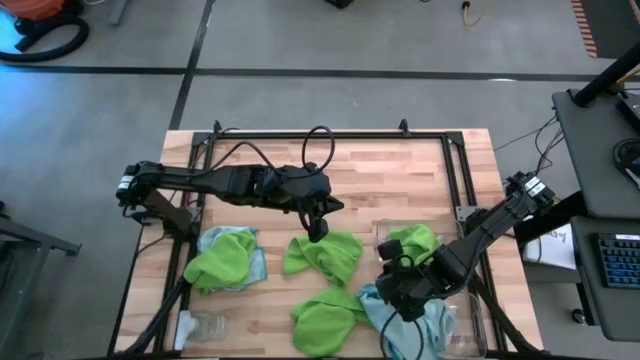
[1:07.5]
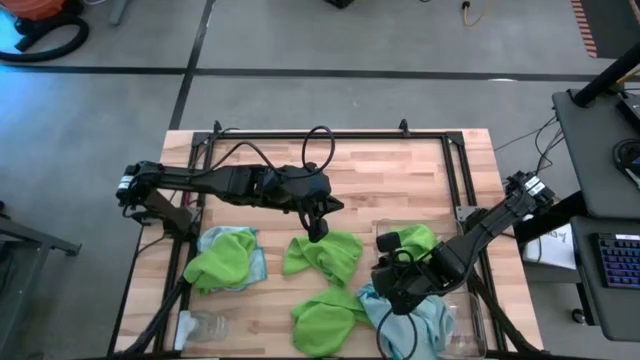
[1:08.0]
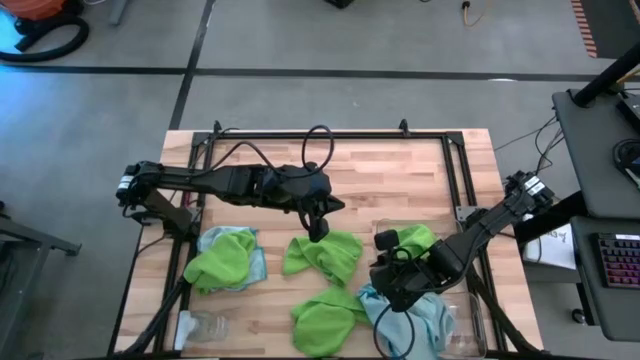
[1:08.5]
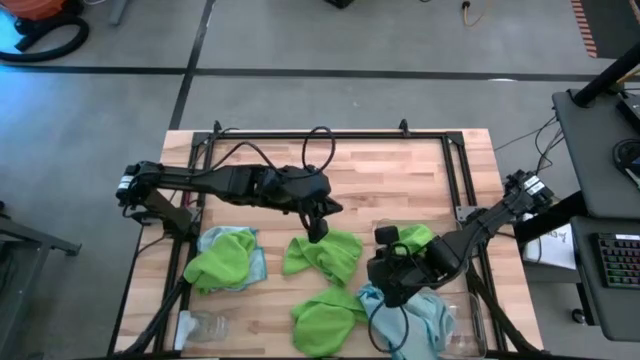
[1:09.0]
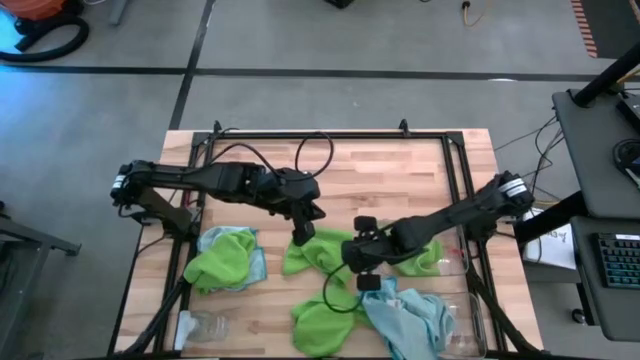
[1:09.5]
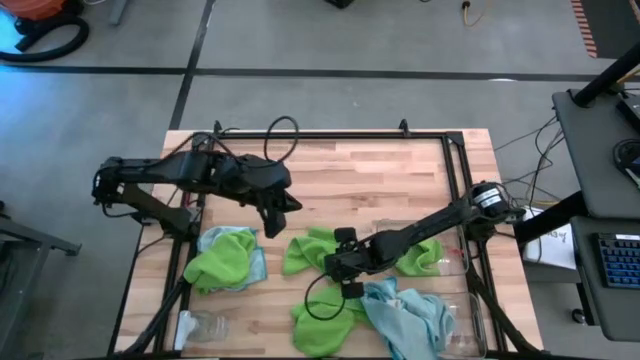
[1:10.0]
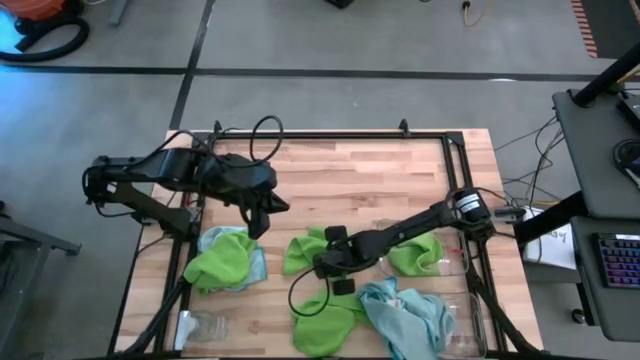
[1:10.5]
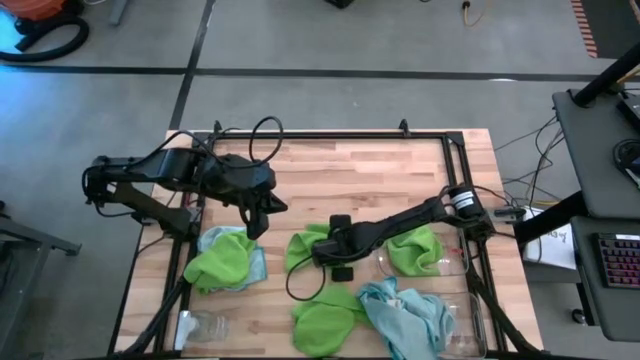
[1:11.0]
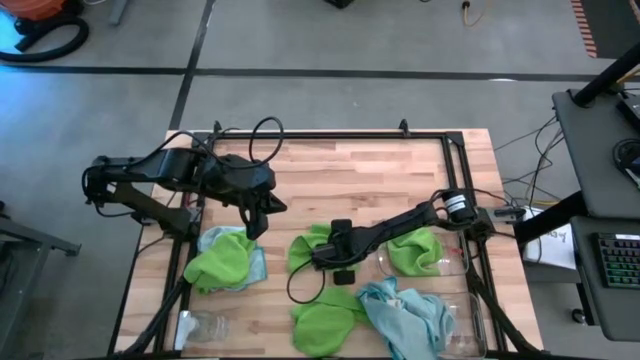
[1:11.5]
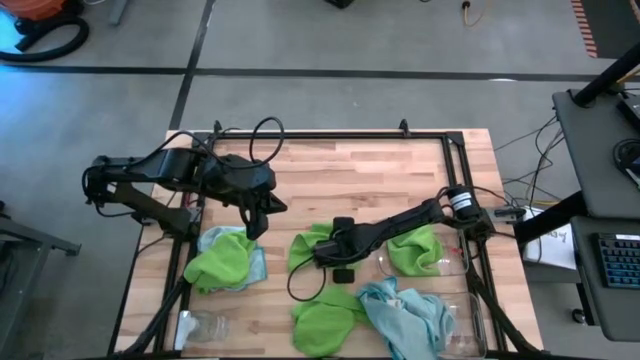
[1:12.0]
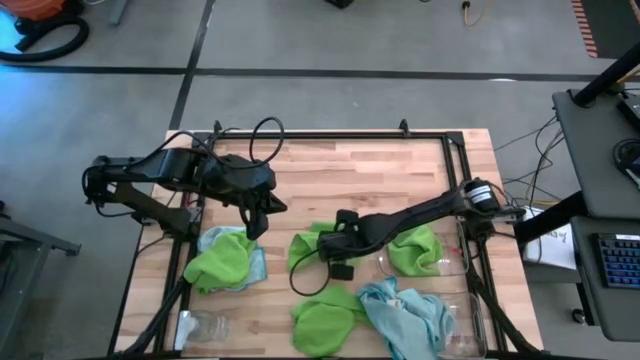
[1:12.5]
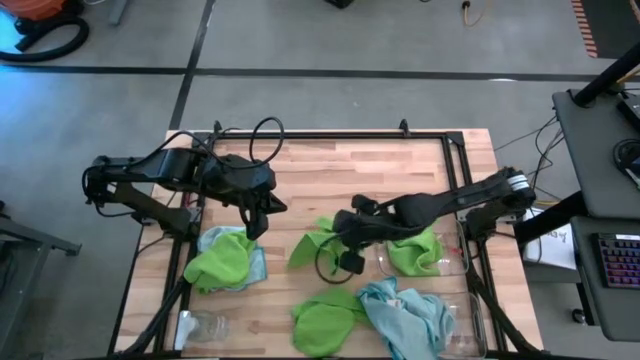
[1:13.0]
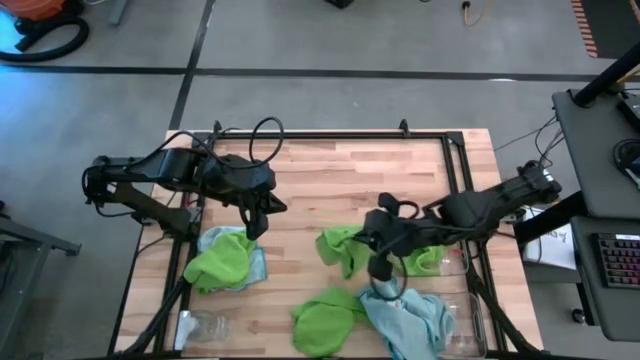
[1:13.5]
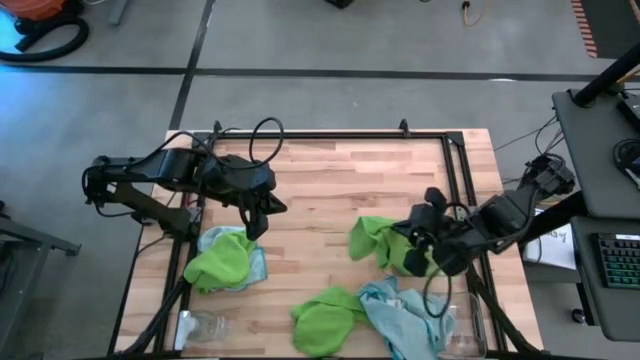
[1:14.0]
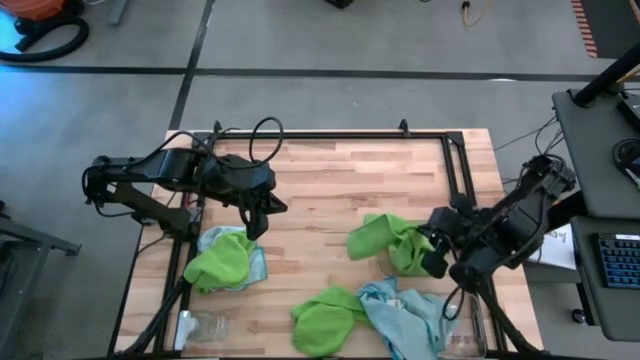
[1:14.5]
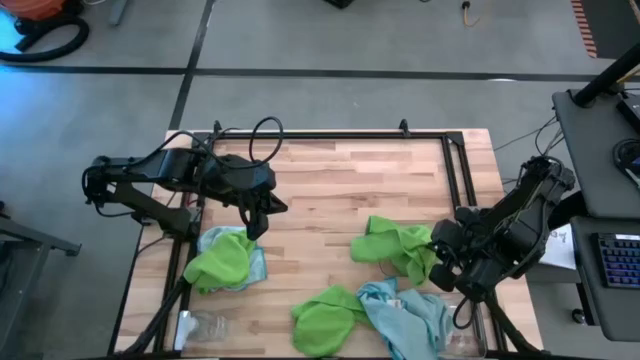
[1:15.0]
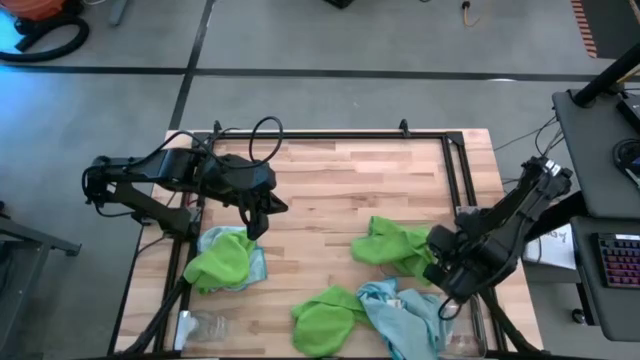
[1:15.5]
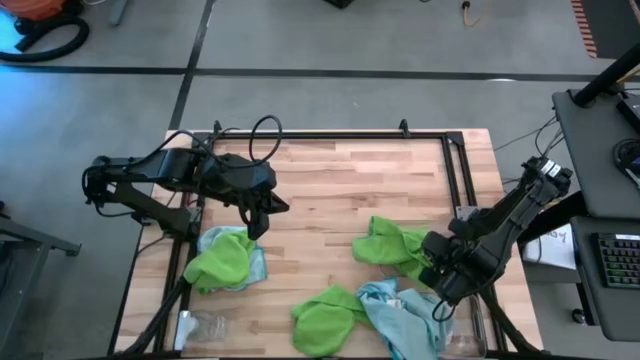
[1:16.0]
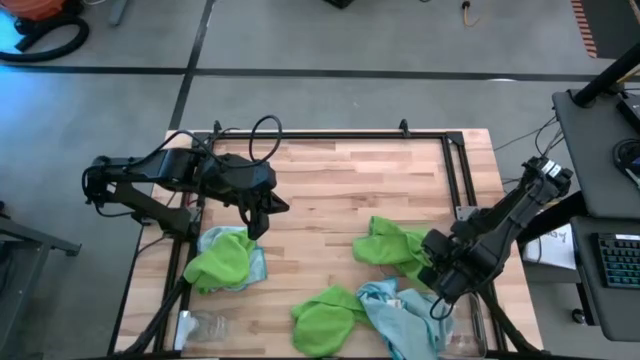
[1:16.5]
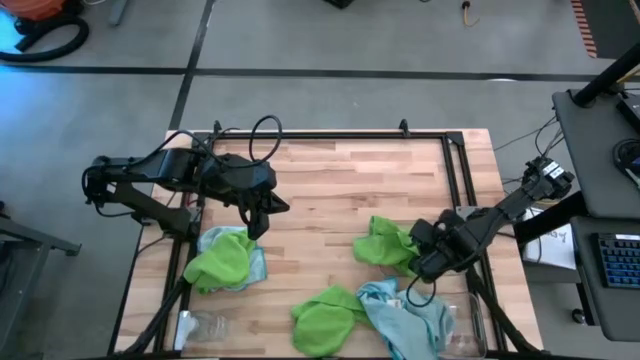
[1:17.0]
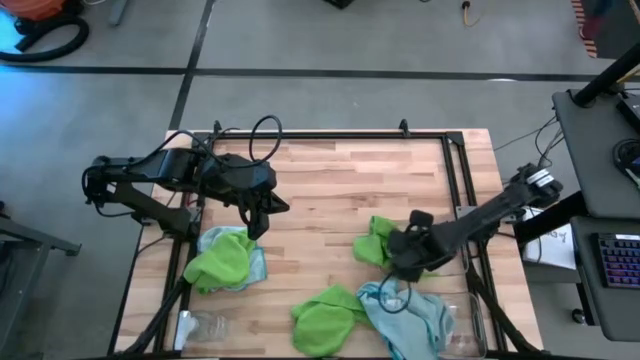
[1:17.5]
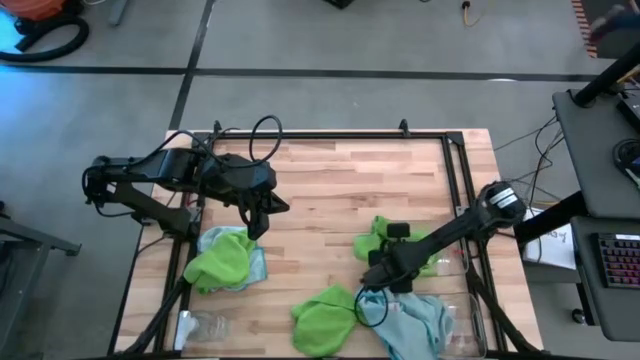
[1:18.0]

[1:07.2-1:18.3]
Task: Sort microfiber towel by color & place in baskets
Put the green microfiber cloth into the top transparent bin

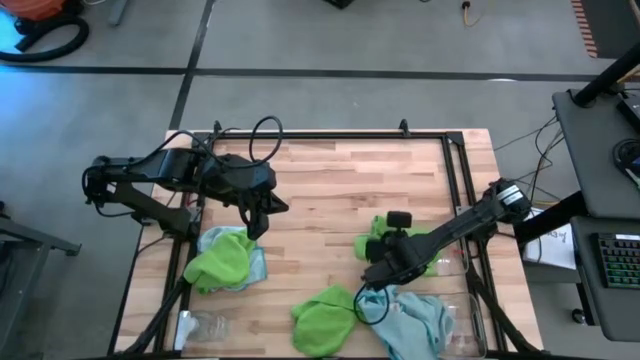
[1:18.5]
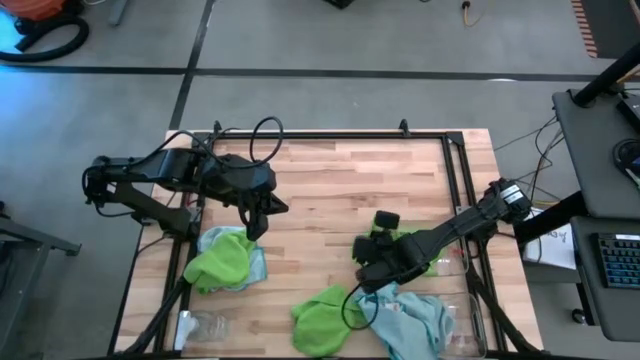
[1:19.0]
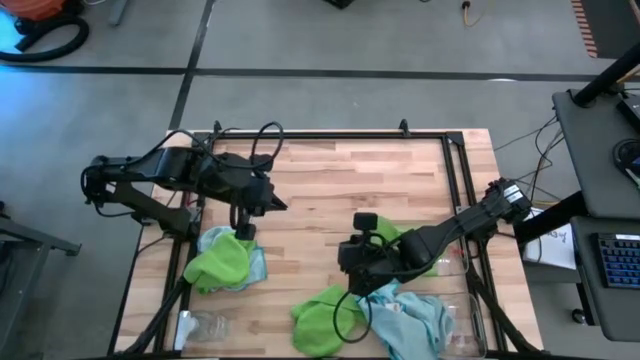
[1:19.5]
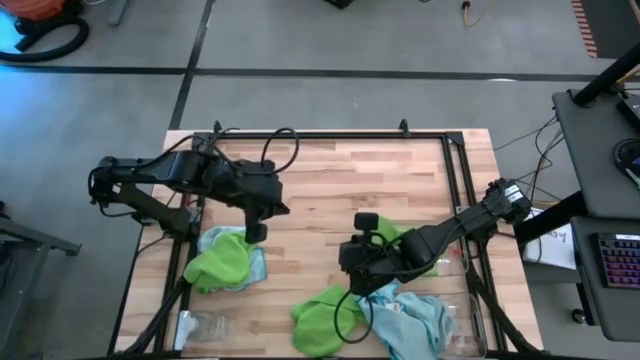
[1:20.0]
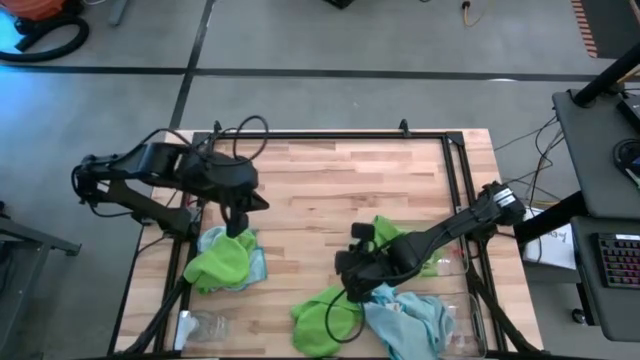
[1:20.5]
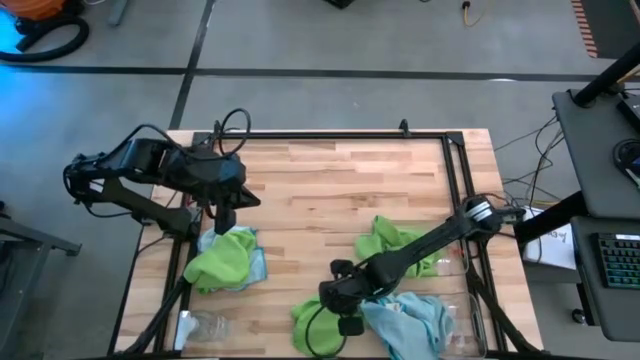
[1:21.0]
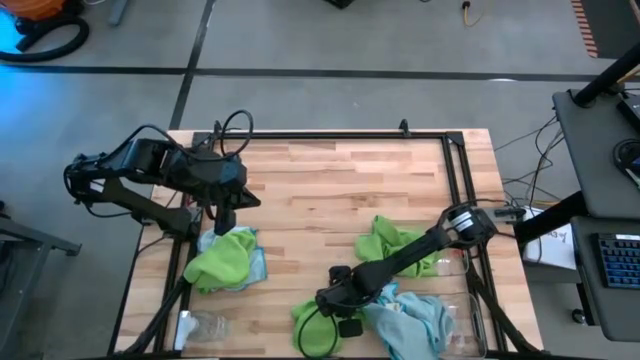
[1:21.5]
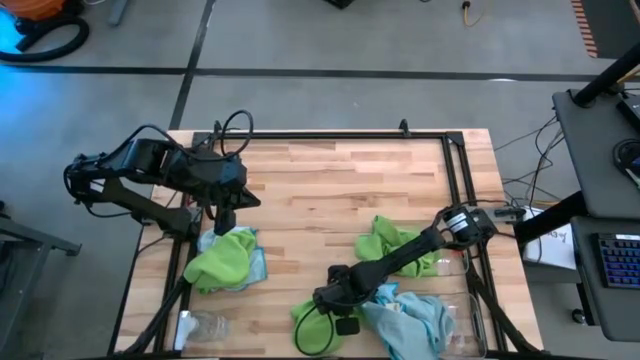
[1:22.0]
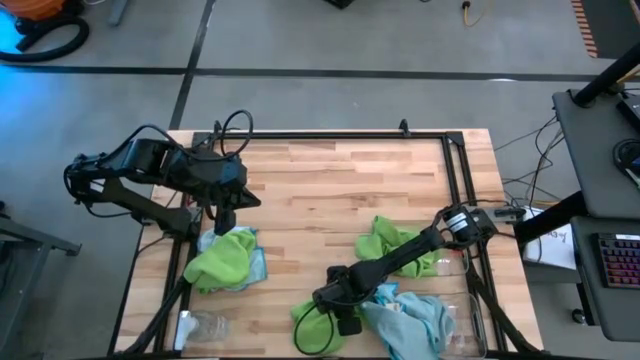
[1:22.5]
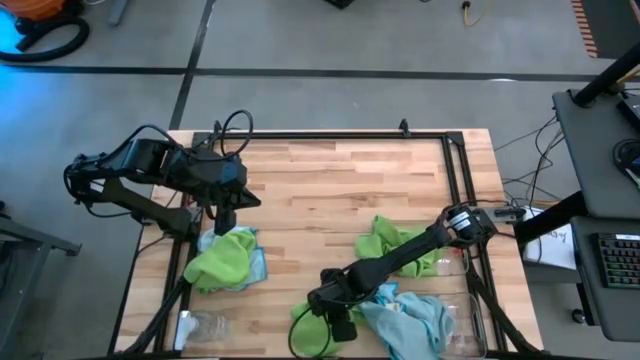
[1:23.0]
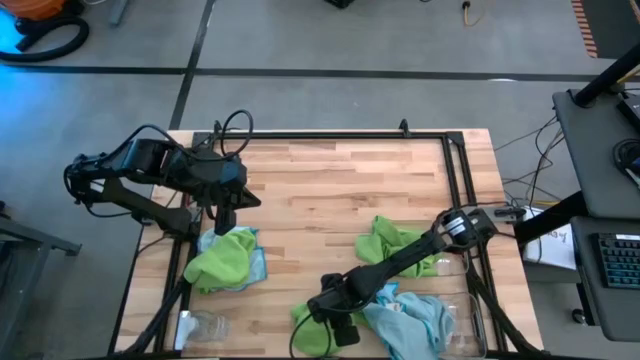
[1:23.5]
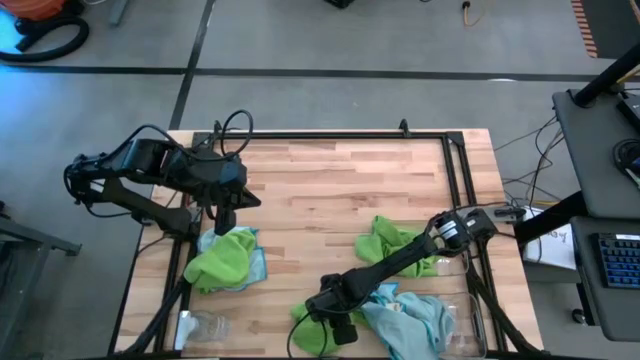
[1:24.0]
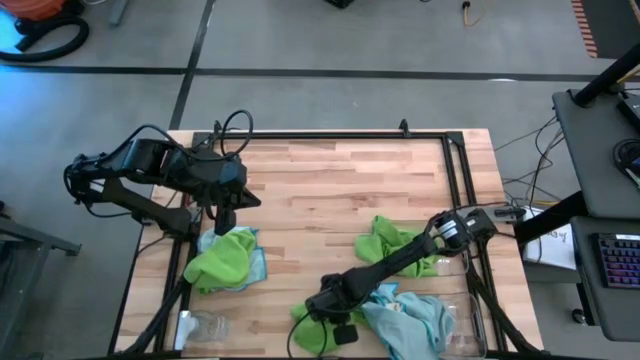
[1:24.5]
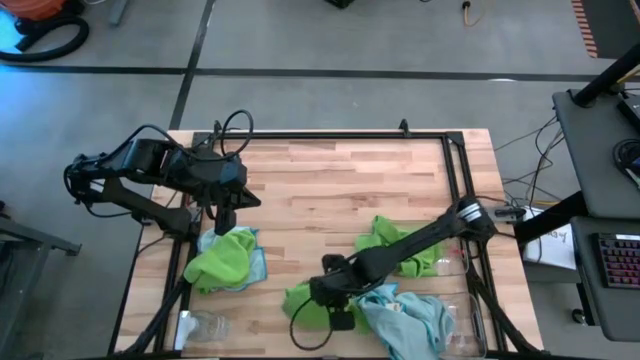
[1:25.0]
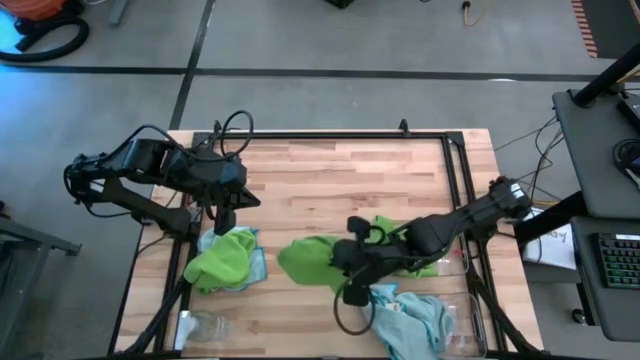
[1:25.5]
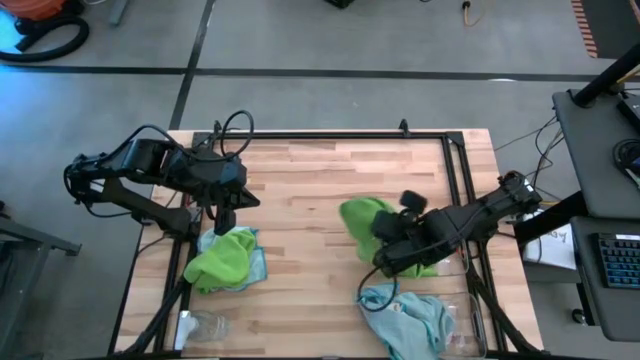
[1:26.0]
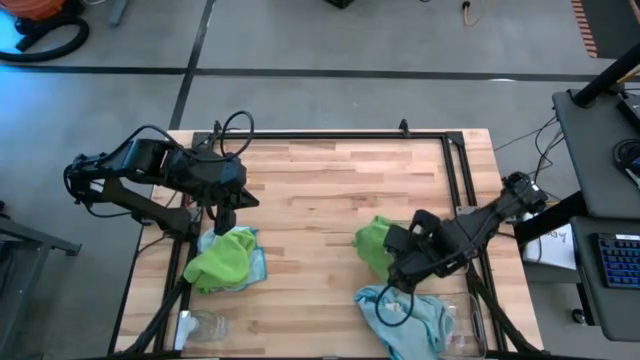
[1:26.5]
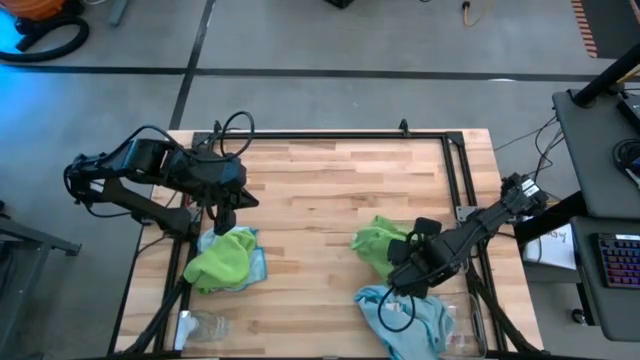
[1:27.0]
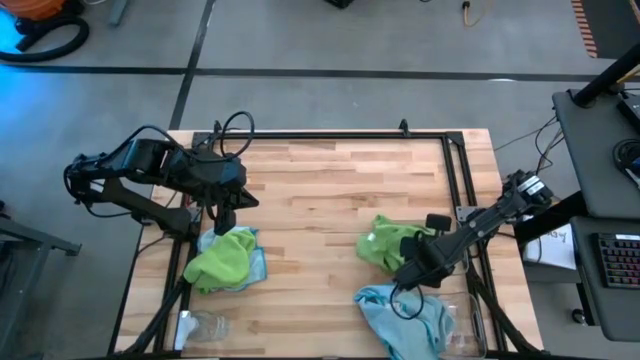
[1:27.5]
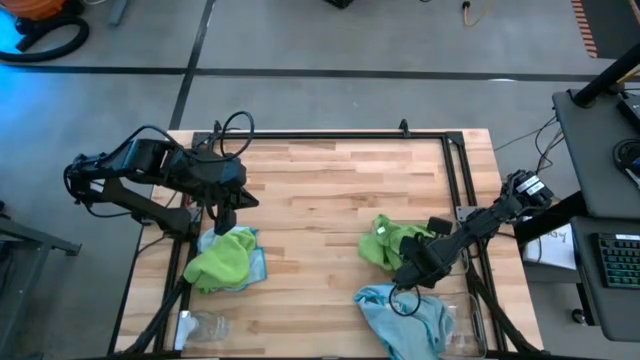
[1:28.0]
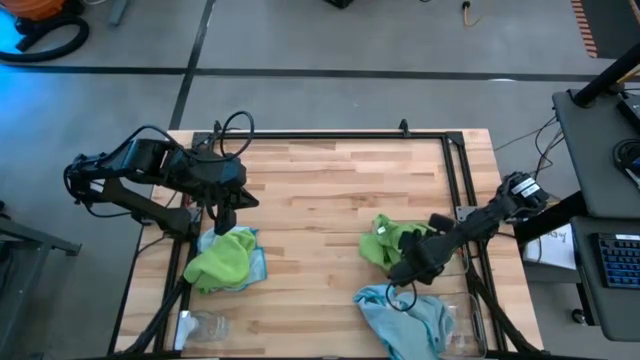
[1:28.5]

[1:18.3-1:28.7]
Put the green microfiber cloth into the top transparent bin
